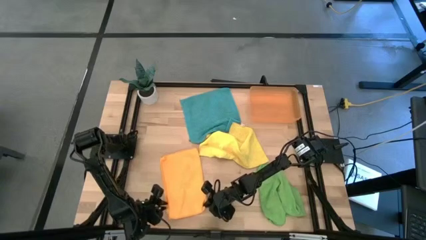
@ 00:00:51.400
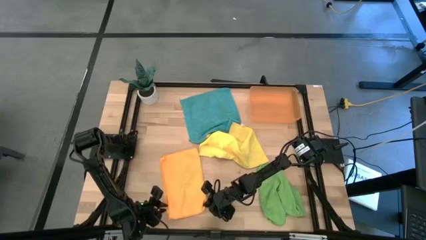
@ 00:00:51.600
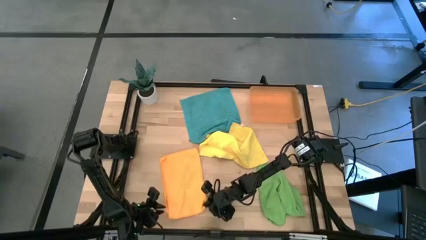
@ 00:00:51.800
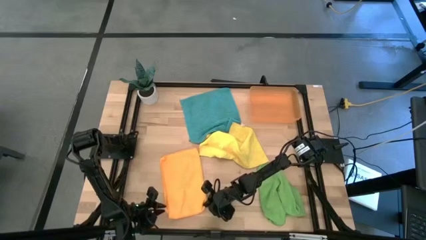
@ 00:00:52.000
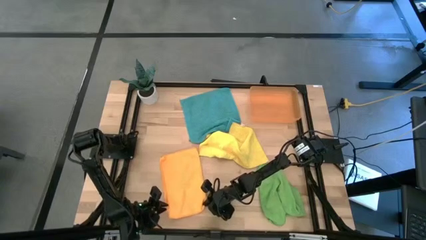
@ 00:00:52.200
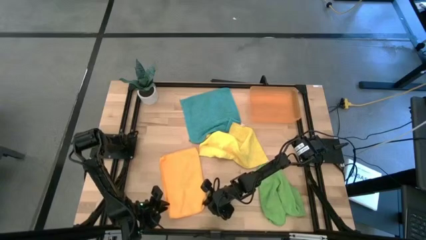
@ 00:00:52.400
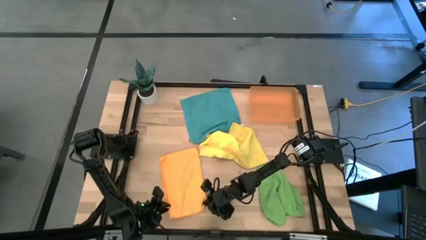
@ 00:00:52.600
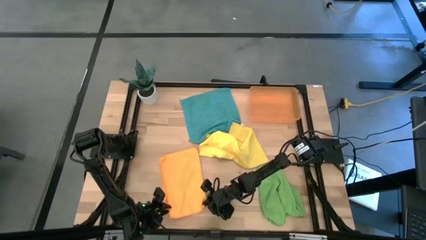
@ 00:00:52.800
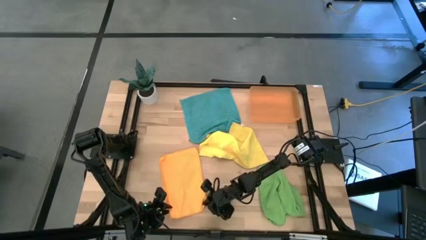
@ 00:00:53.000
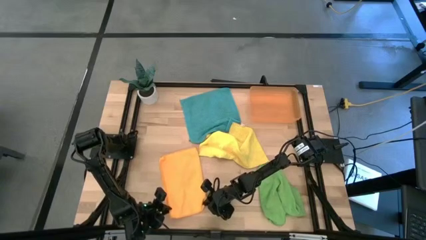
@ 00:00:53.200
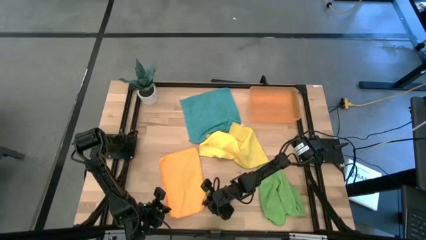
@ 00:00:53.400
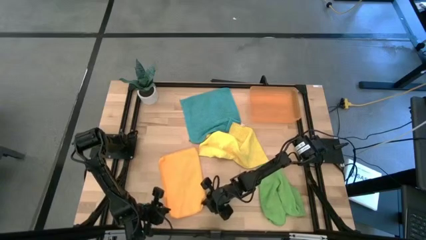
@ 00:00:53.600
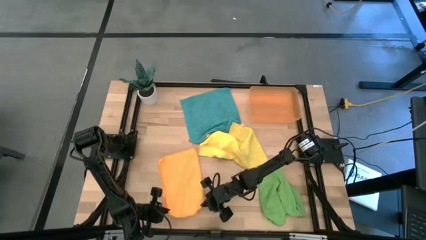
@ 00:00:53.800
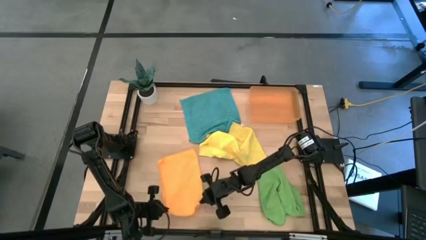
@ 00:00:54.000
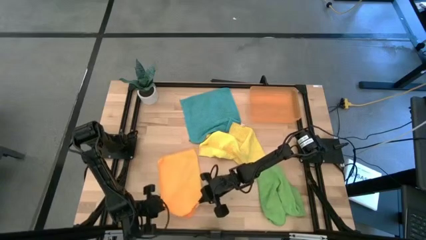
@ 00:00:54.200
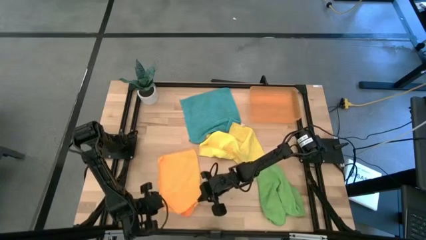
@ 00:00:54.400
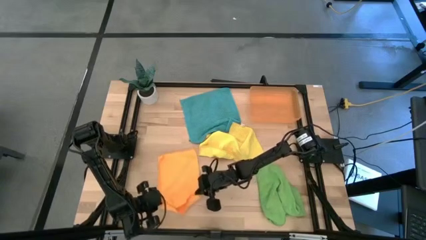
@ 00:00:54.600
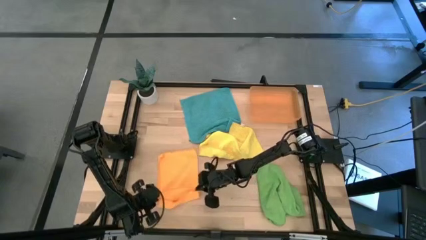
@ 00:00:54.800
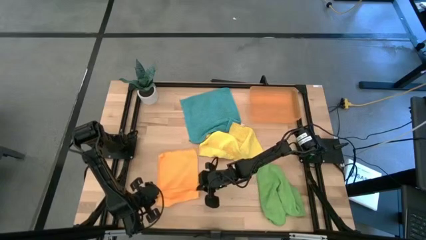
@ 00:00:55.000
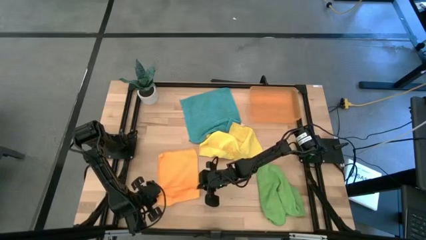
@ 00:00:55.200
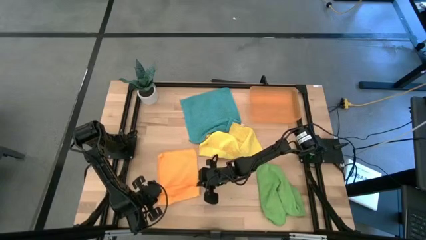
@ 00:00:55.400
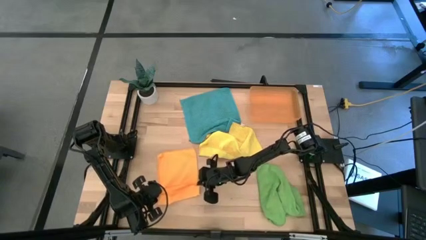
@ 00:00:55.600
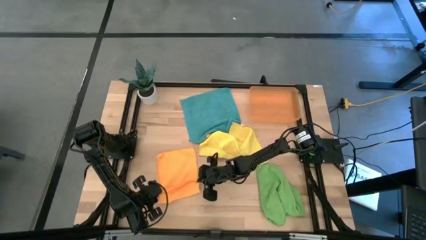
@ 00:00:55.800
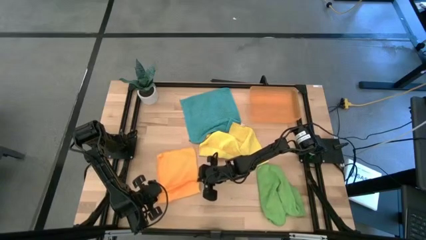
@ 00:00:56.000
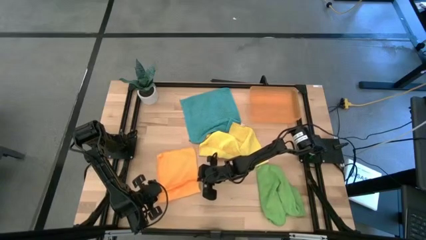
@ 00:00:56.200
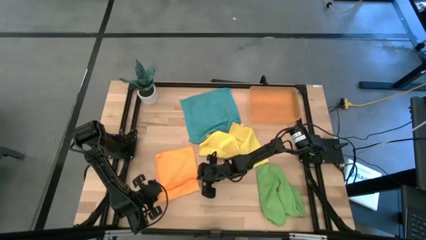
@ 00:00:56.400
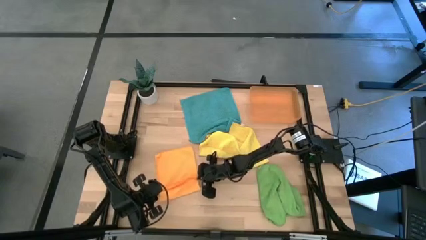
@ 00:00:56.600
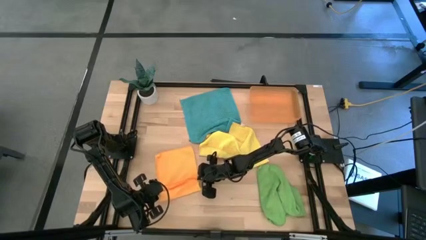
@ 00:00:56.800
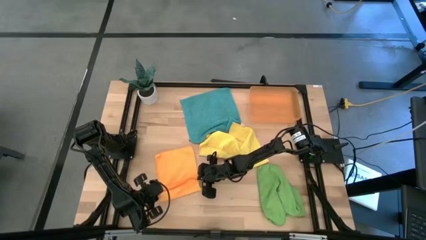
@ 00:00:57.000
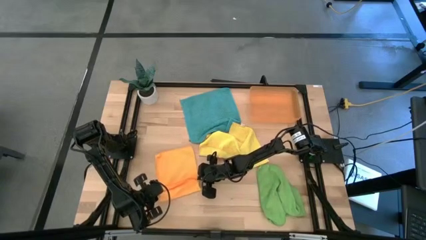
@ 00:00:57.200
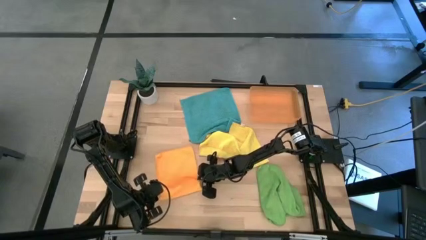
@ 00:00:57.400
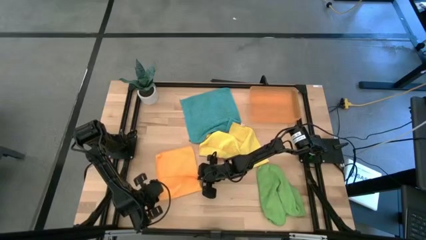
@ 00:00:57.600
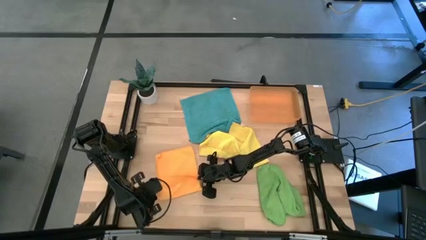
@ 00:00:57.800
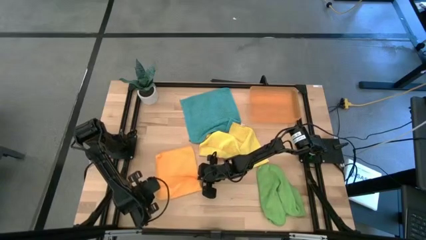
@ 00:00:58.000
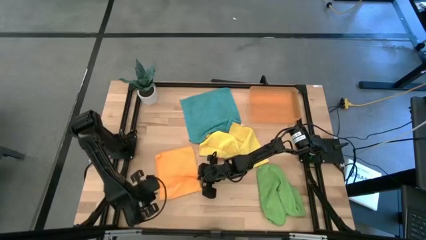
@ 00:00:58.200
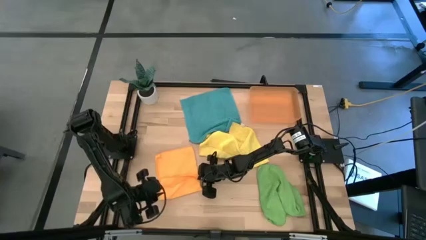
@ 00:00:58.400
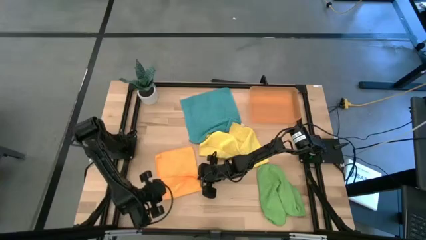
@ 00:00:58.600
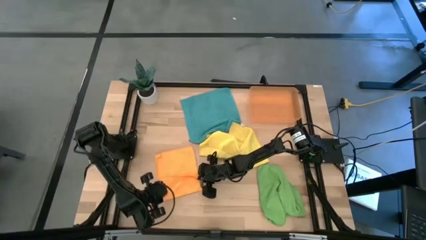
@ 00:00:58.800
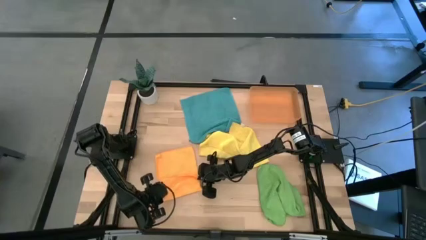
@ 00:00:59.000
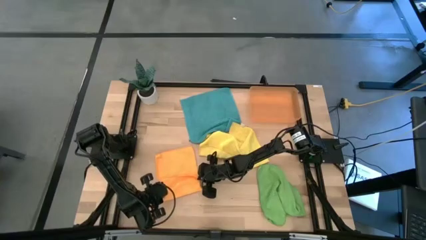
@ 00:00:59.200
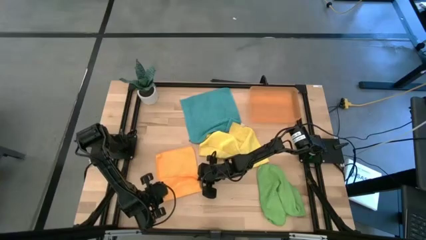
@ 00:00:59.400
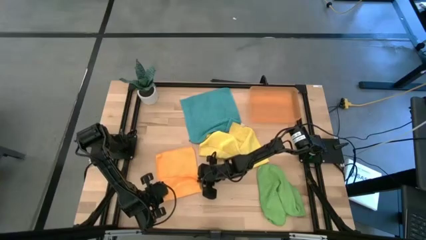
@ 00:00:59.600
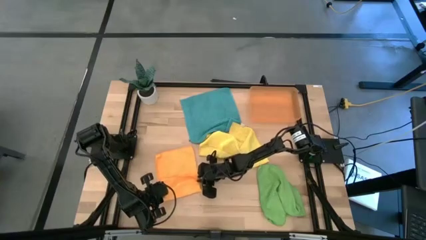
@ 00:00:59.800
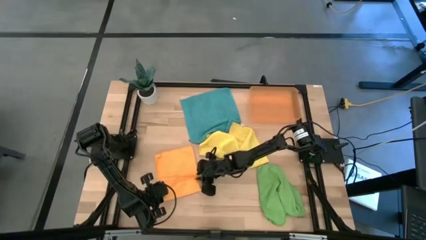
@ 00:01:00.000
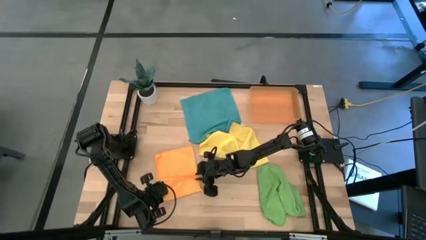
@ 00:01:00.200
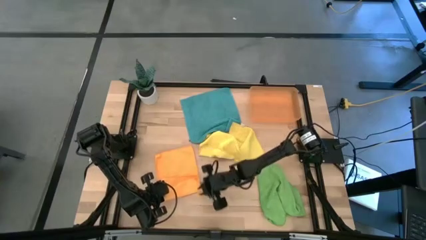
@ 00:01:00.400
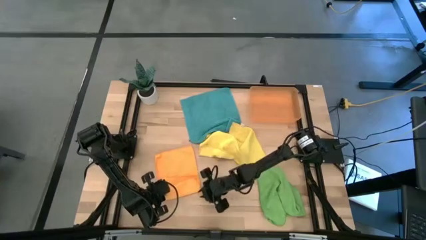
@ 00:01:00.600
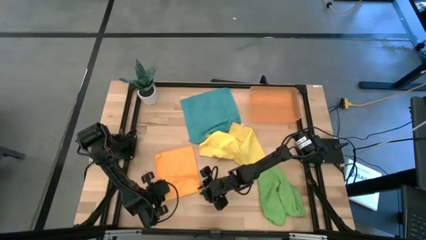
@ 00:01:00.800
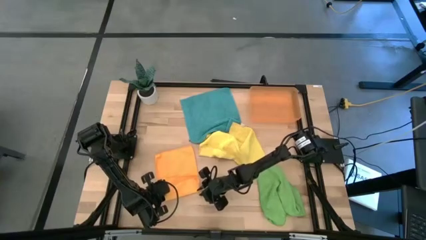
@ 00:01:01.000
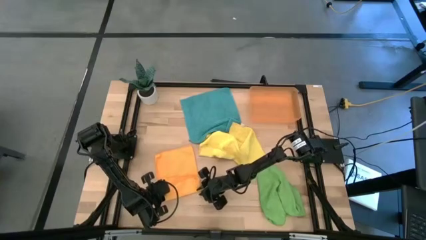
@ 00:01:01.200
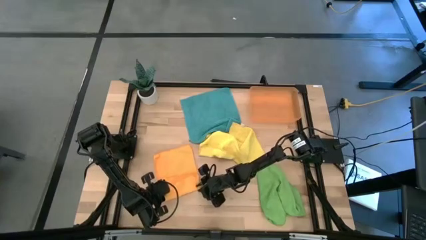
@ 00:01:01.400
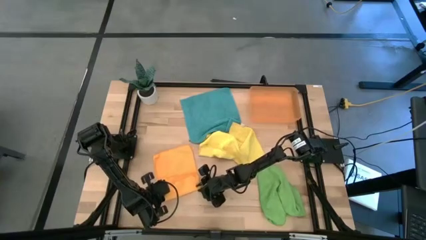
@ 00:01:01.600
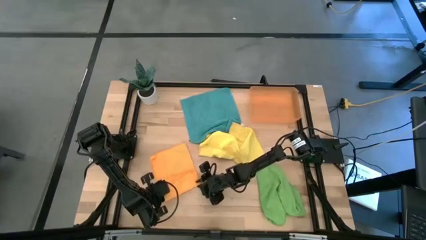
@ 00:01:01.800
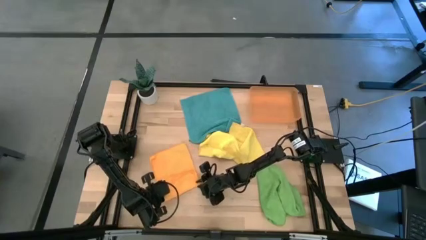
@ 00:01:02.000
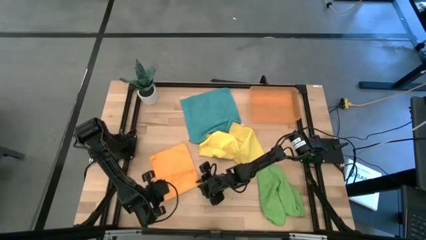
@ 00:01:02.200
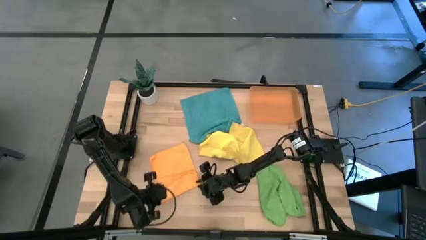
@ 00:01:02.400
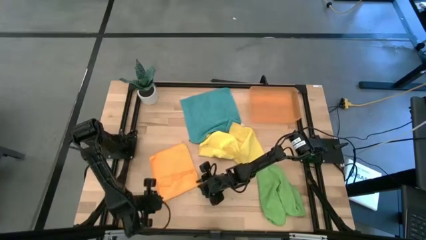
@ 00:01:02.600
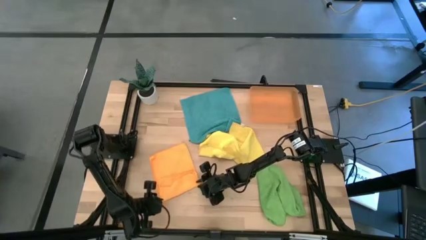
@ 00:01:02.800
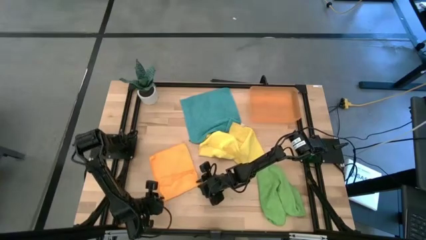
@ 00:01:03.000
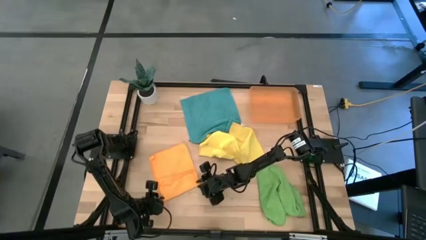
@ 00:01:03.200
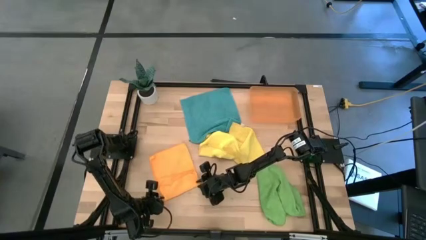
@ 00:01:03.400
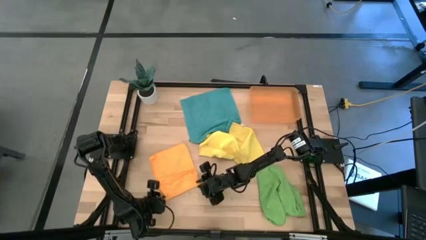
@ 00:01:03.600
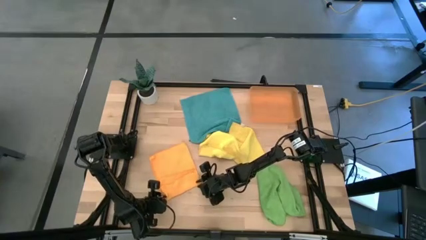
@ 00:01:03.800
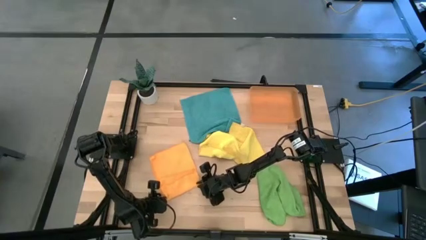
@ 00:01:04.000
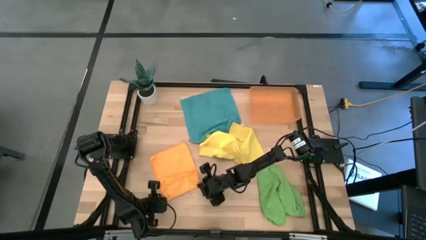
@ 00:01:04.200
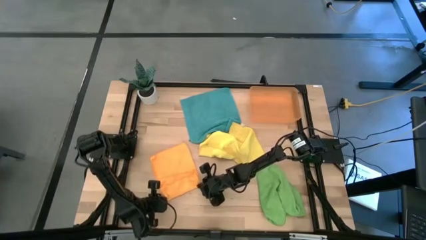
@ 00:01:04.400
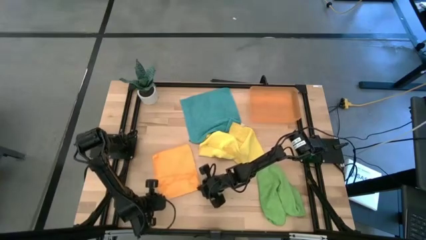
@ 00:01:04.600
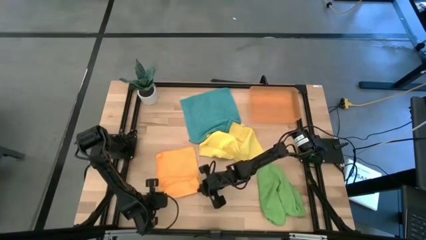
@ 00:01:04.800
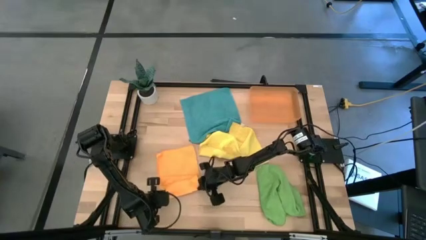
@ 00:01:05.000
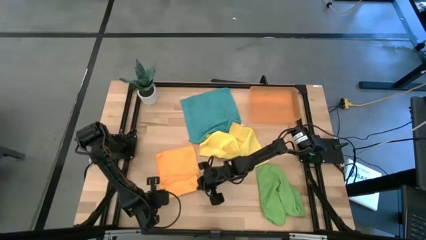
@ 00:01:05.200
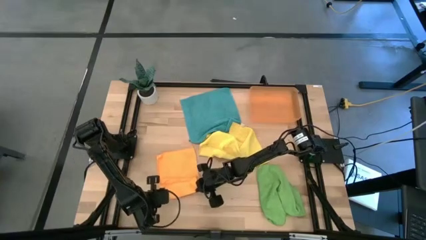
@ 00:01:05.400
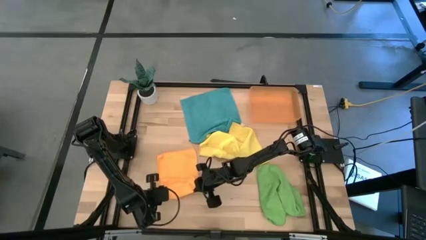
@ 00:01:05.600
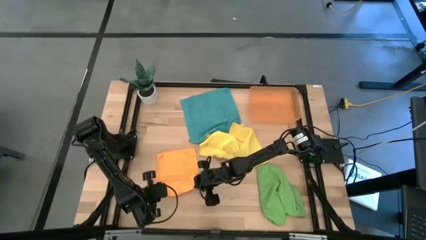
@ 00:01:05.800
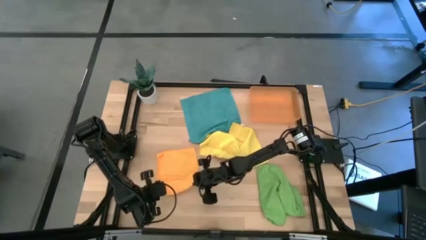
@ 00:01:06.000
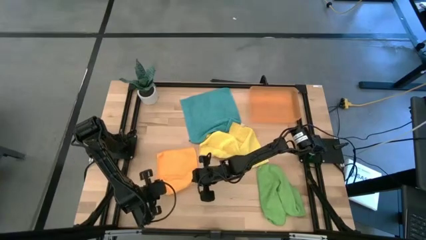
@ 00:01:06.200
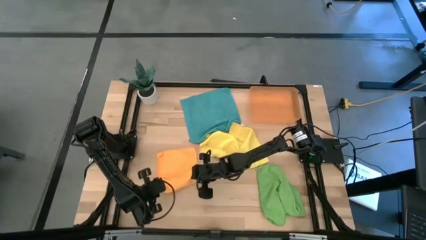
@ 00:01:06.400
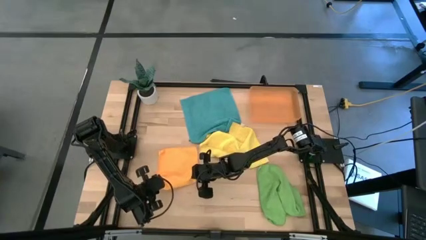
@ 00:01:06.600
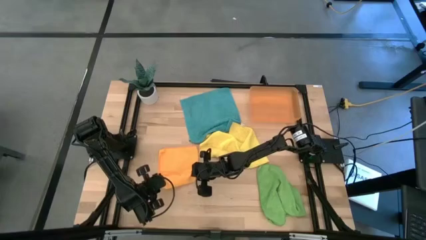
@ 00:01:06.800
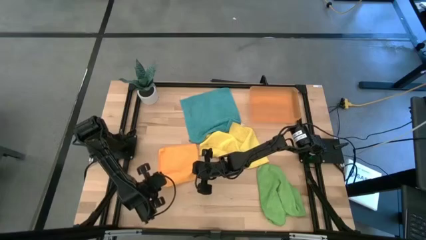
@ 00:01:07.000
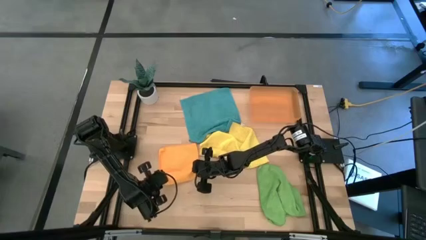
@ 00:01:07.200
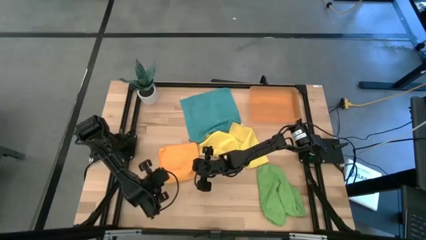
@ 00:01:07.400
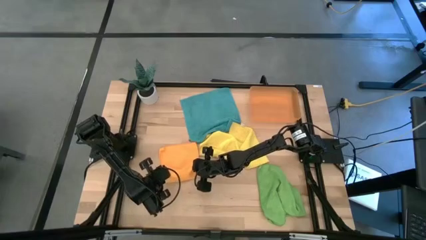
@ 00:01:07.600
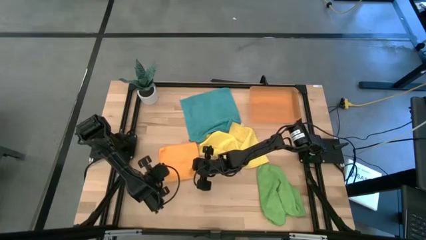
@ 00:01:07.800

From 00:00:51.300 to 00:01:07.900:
Task: Roll microfiber towels into tight, uniform cylinder then place into a basket
Roll the orange microfiber towel
